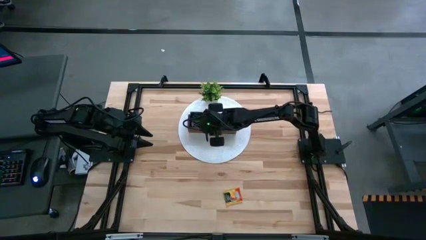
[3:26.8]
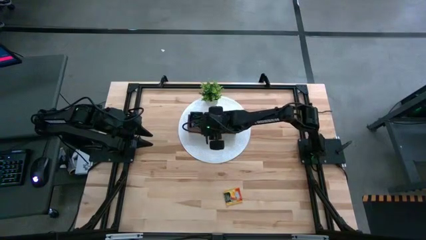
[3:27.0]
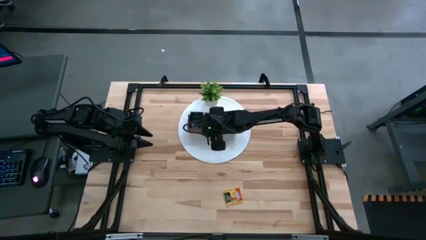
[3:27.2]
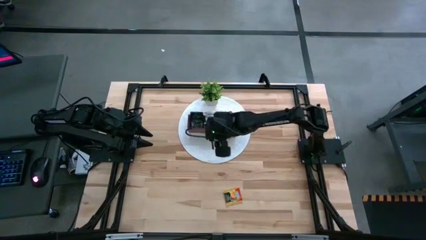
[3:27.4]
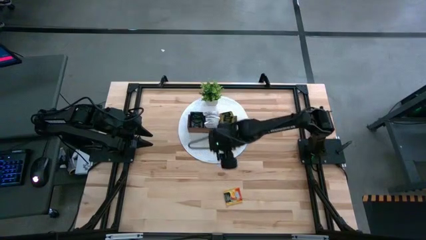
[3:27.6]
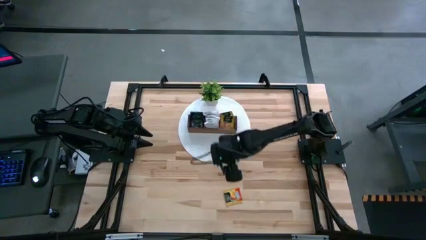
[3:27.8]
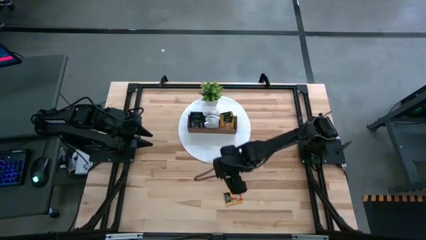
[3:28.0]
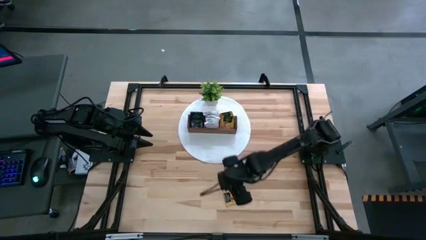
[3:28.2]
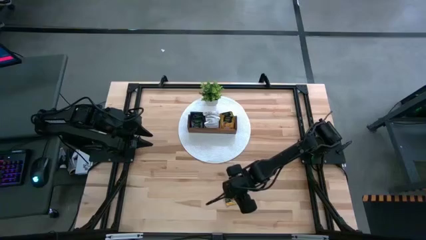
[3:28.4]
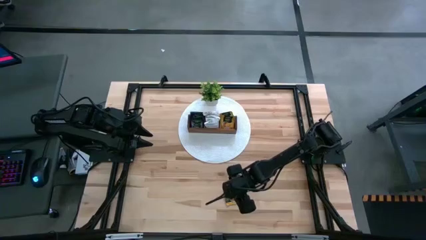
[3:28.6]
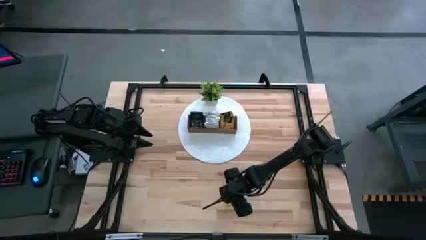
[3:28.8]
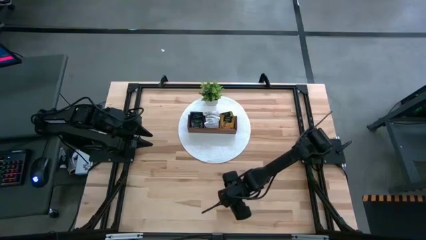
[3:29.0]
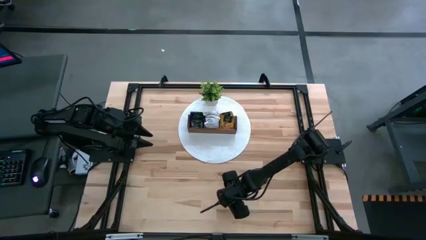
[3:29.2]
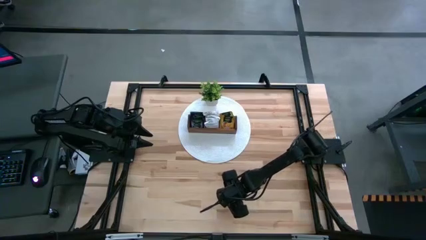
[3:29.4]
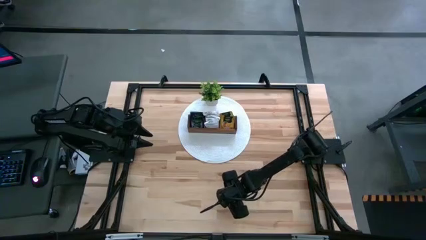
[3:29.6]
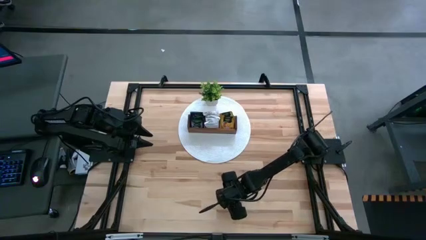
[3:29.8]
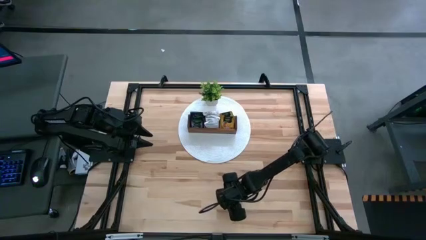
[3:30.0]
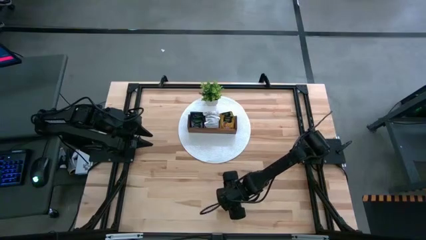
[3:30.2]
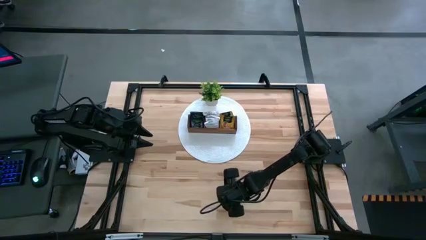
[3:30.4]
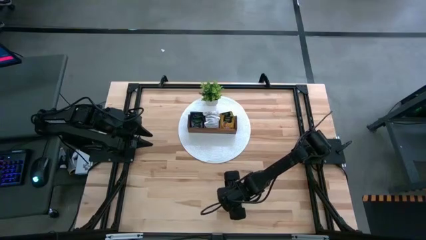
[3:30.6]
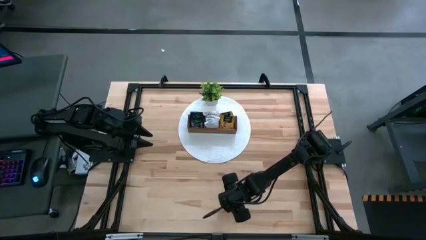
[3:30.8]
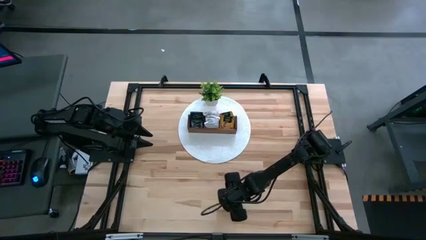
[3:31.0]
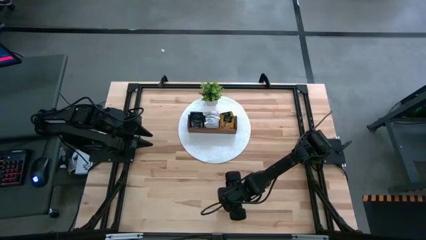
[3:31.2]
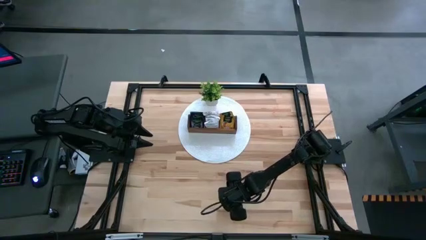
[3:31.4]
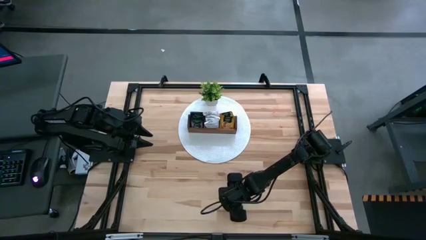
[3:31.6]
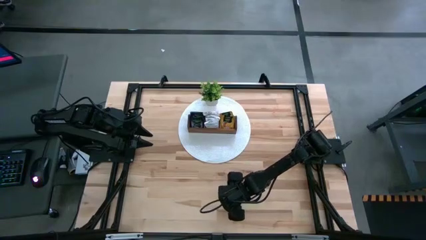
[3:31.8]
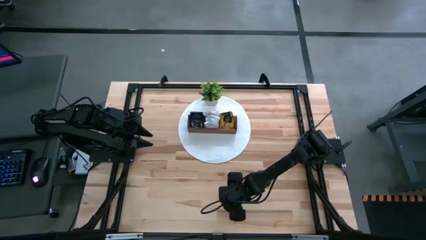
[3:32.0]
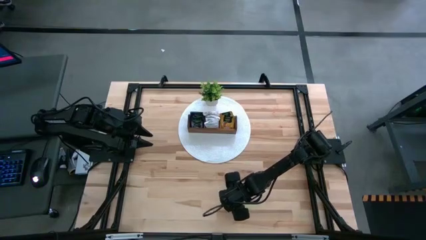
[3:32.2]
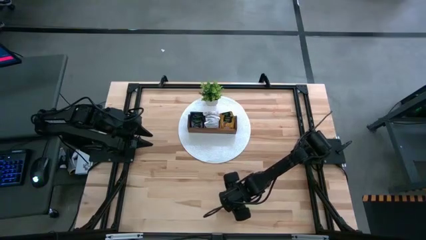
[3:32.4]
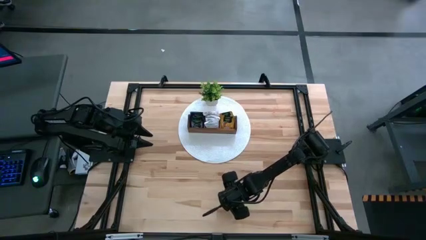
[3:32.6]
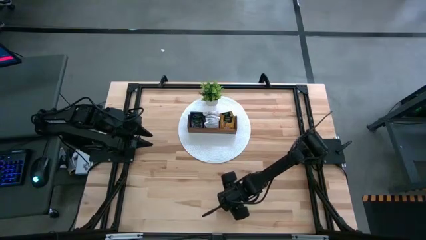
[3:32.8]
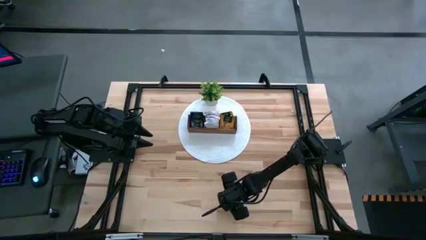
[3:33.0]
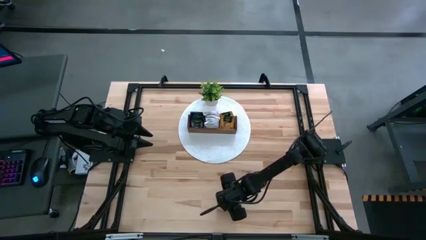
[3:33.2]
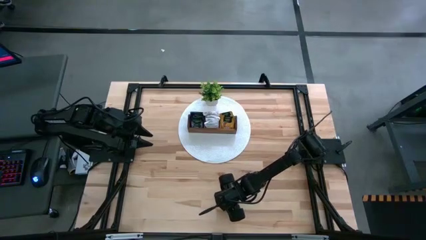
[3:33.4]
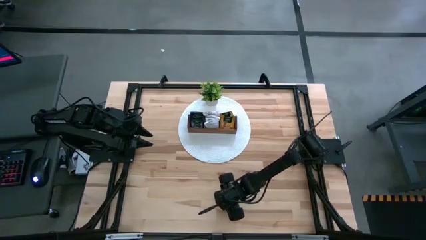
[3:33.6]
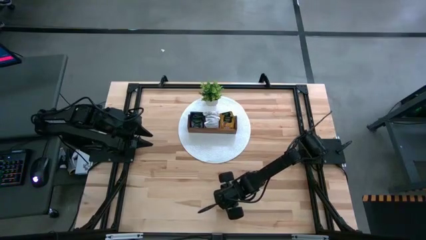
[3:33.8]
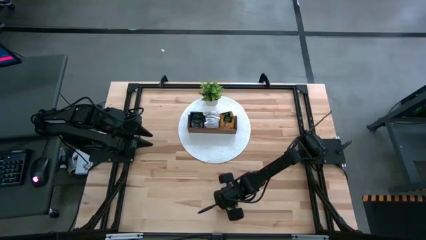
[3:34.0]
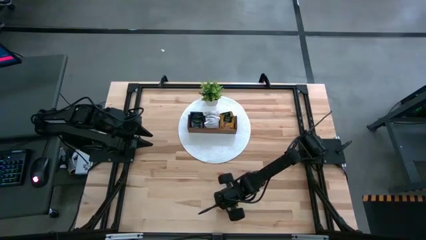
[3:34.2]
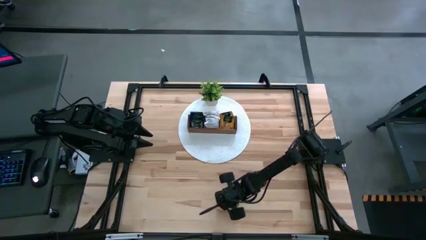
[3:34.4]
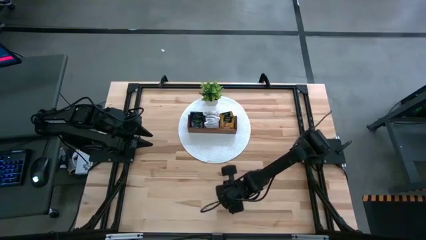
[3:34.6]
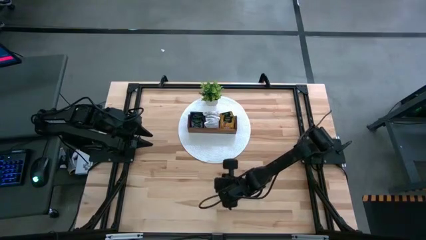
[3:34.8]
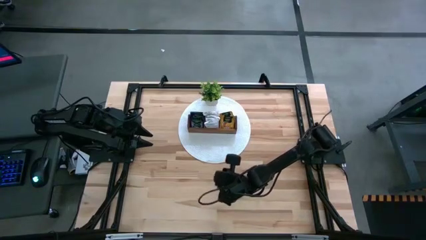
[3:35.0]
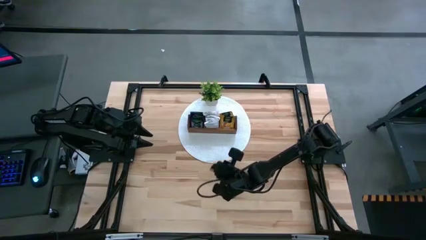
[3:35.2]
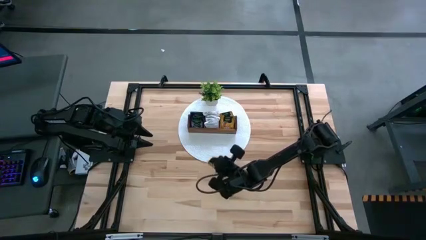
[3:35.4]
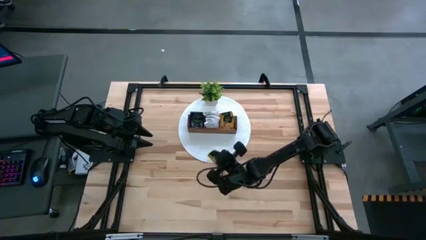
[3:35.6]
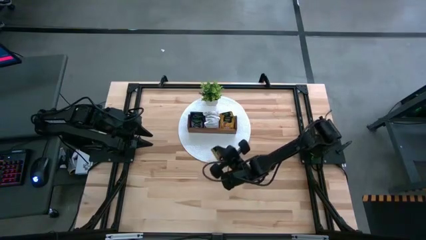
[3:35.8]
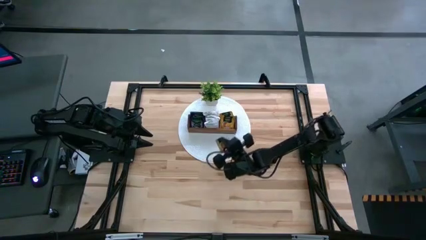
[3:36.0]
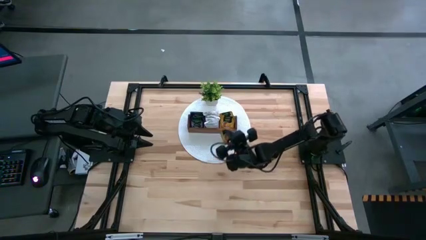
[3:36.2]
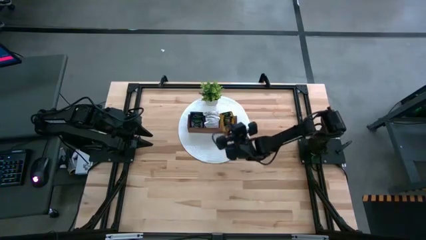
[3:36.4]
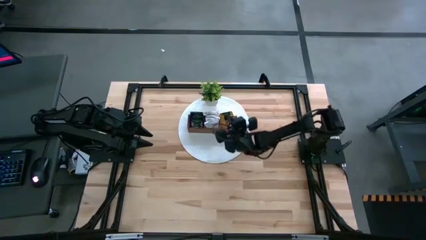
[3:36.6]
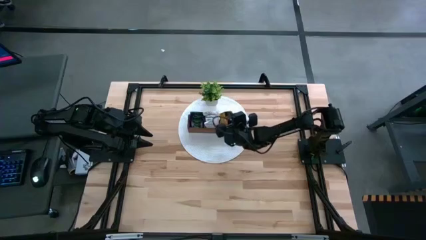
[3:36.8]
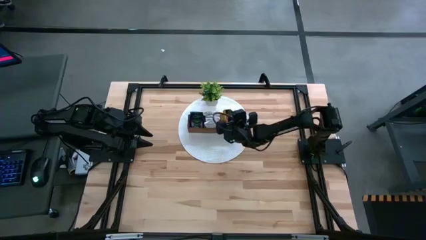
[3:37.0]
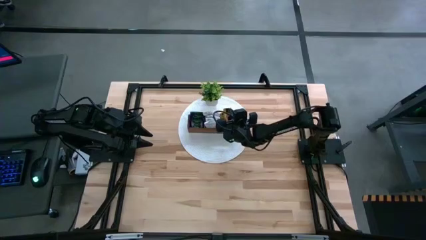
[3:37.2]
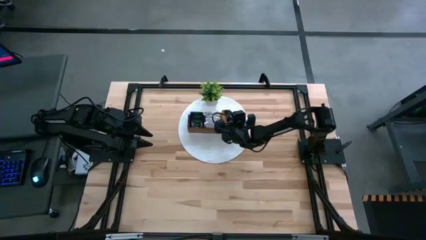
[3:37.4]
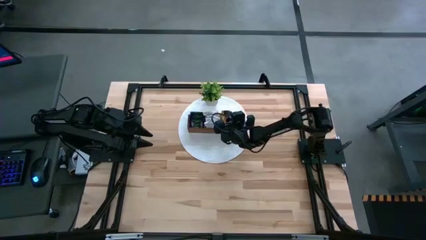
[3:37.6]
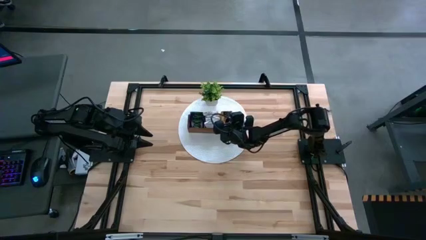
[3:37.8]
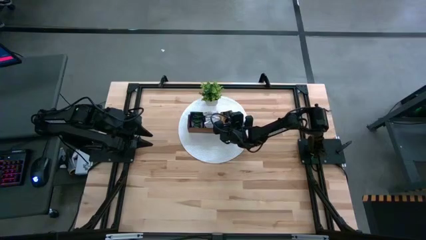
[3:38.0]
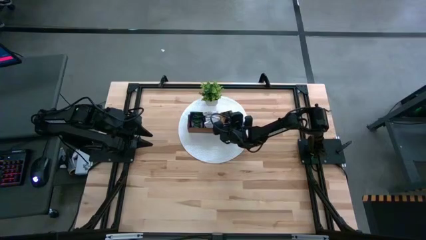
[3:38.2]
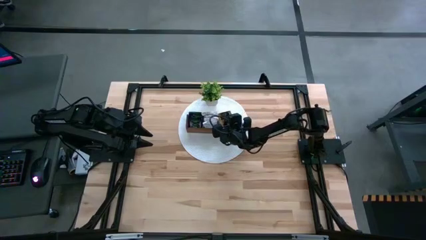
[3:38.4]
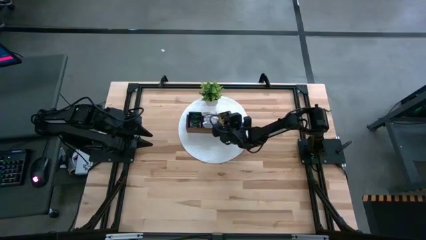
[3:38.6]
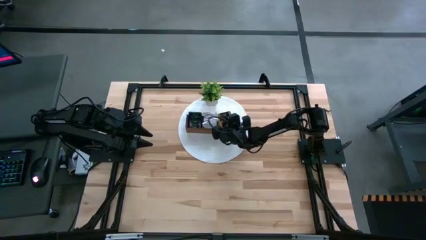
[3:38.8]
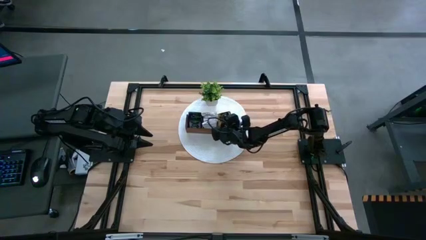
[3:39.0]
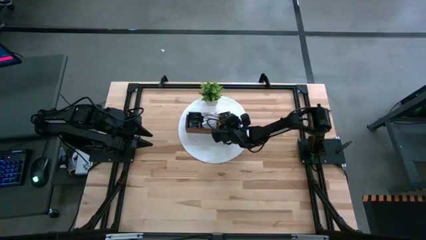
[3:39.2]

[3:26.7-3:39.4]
Task: Pick & Place Tea
Put the orange tea bag into the right section of the wooden organizer

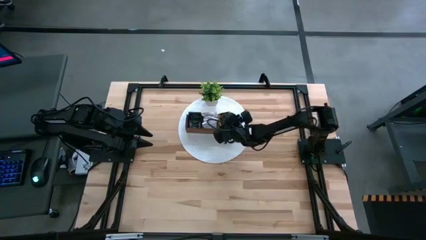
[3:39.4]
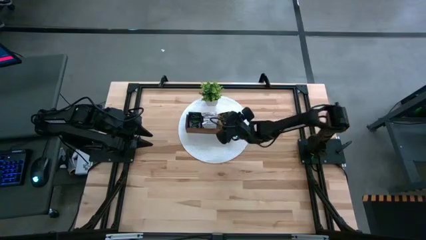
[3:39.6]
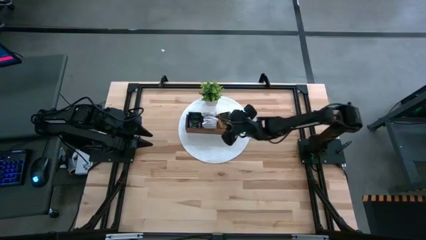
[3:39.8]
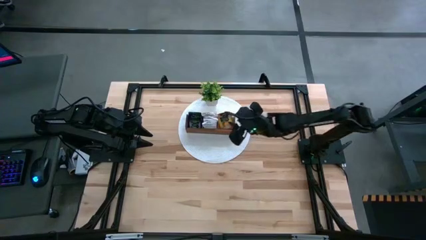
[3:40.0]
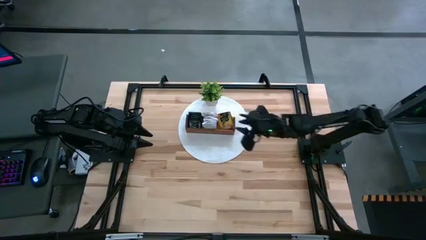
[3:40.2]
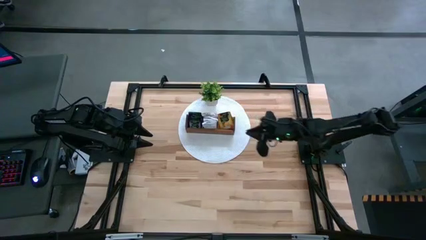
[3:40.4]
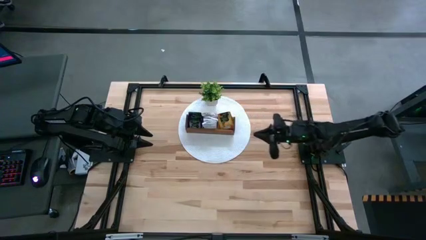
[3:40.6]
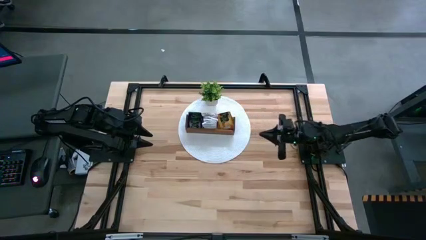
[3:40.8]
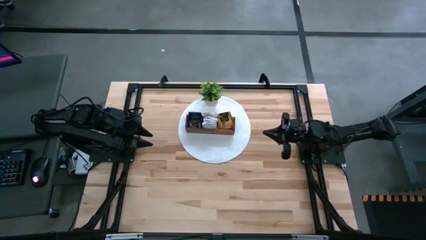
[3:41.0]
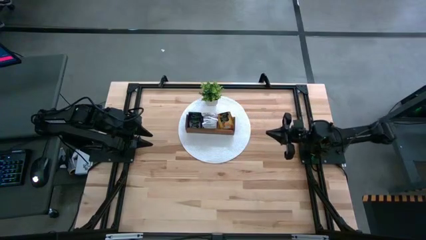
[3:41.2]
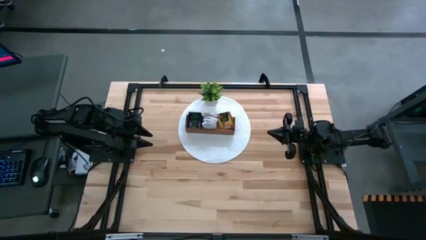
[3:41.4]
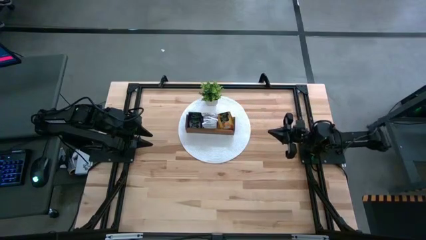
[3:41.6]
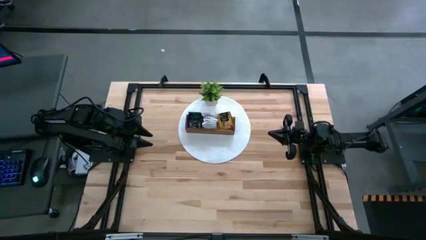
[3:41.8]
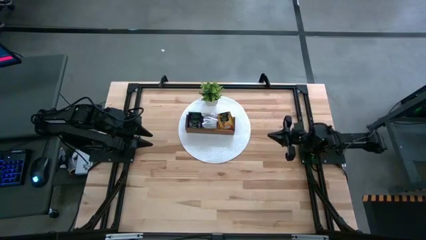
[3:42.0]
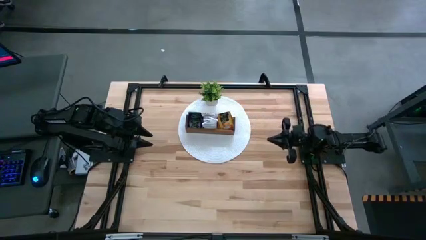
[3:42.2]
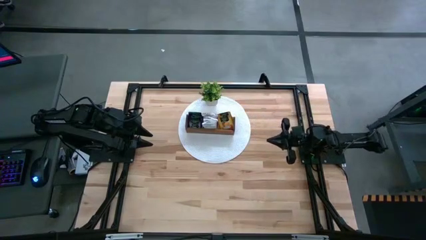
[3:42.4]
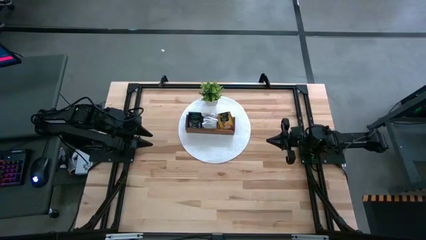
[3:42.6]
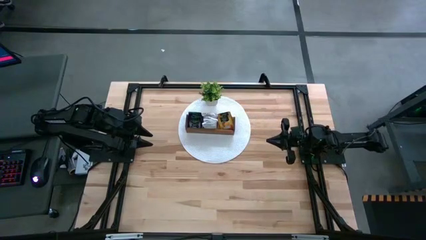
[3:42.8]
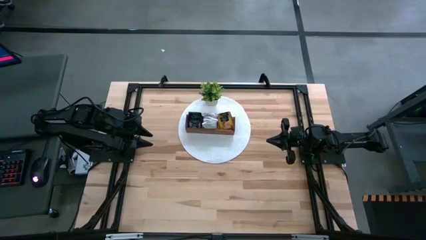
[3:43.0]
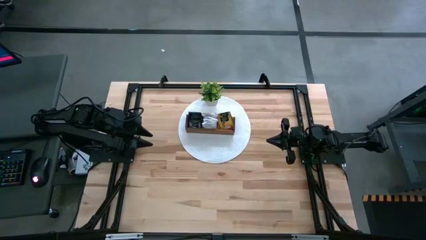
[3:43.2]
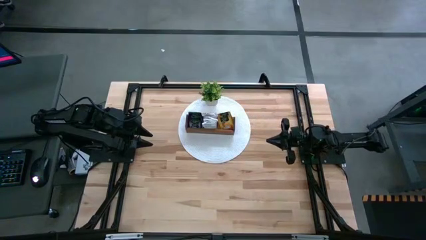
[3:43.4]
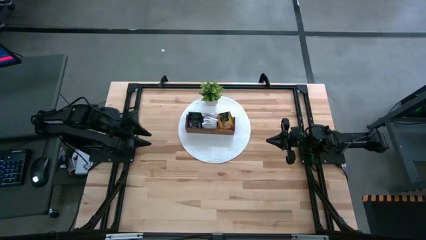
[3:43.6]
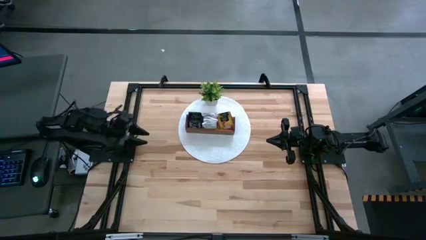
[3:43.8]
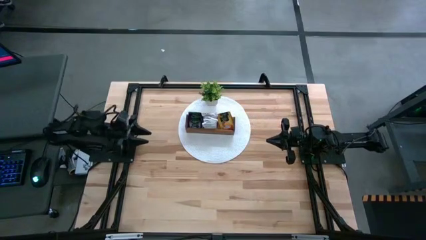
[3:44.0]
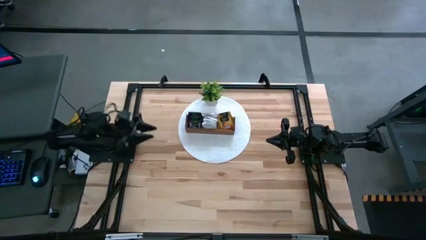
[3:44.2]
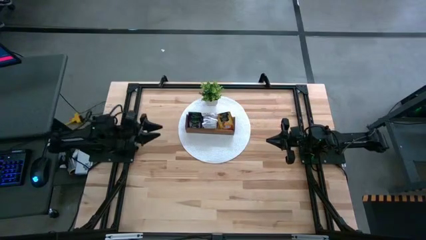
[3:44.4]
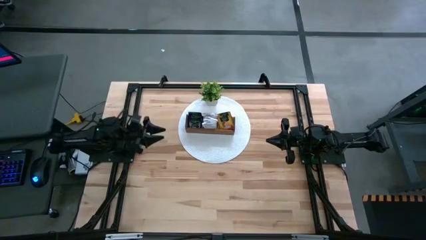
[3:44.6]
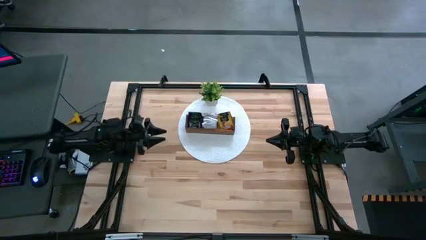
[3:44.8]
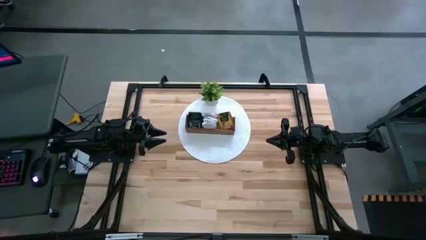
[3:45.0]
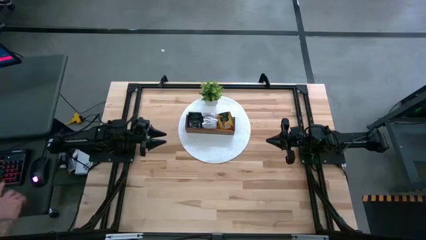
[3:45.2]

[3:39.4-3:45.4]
Return to Home Position
